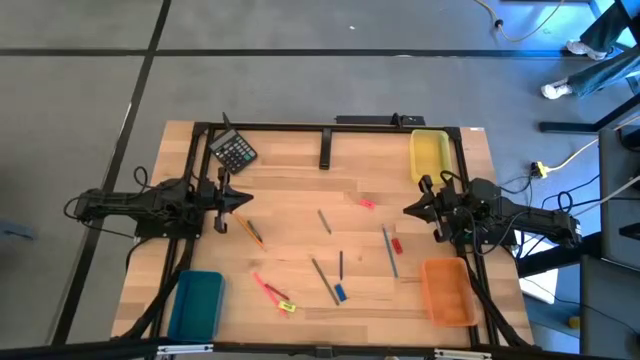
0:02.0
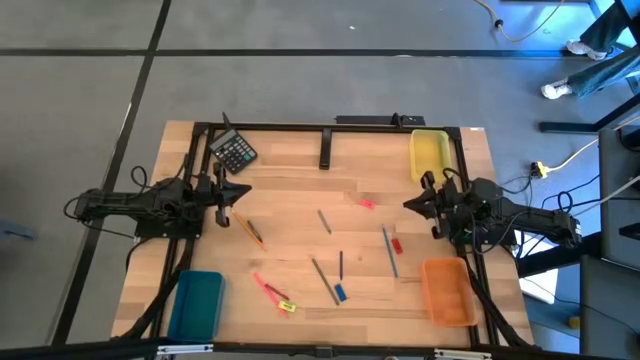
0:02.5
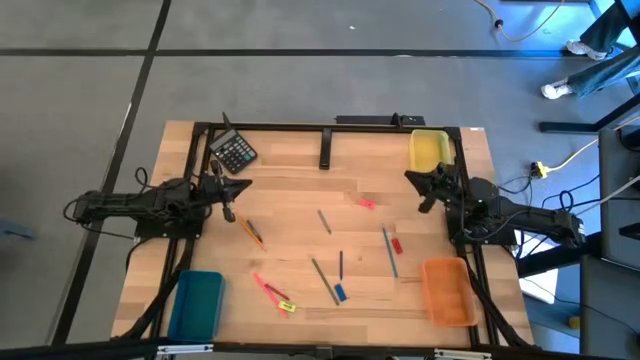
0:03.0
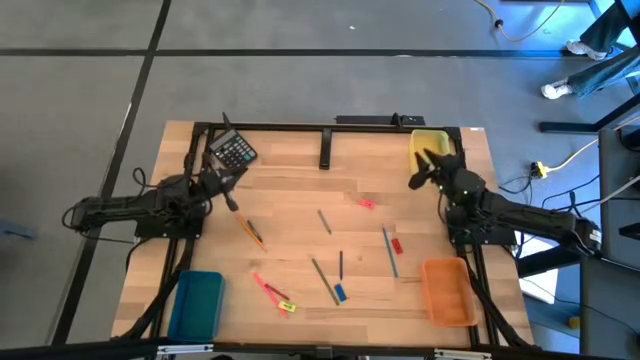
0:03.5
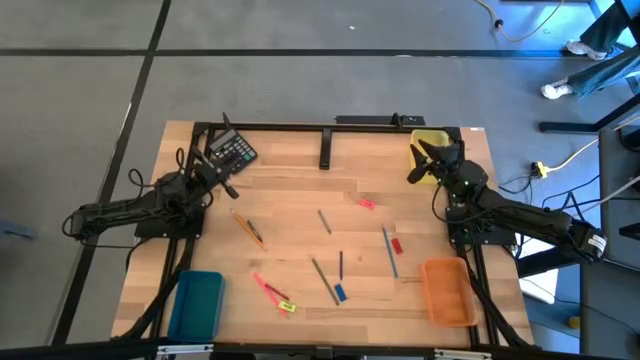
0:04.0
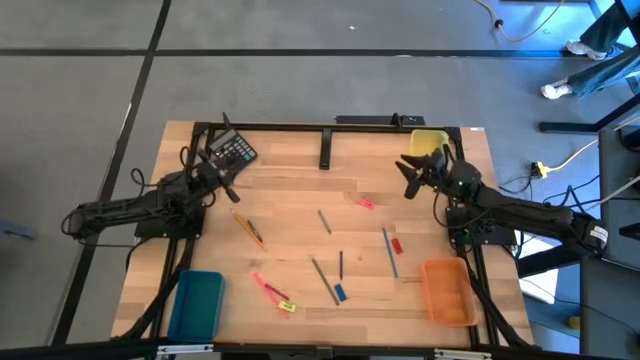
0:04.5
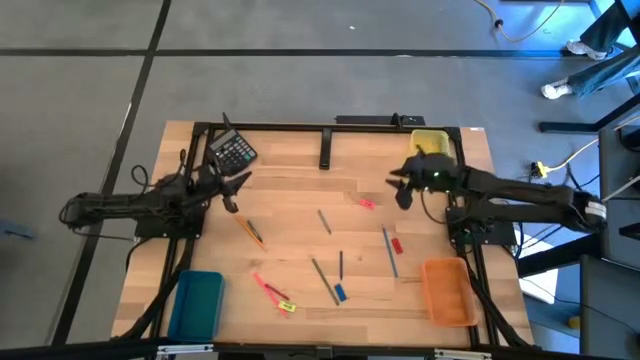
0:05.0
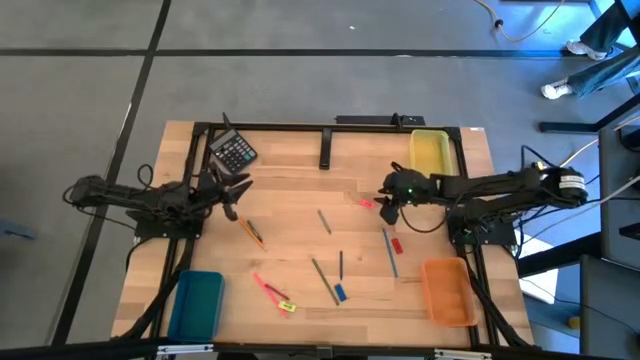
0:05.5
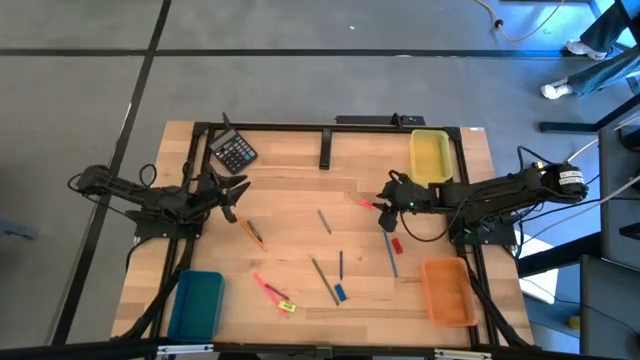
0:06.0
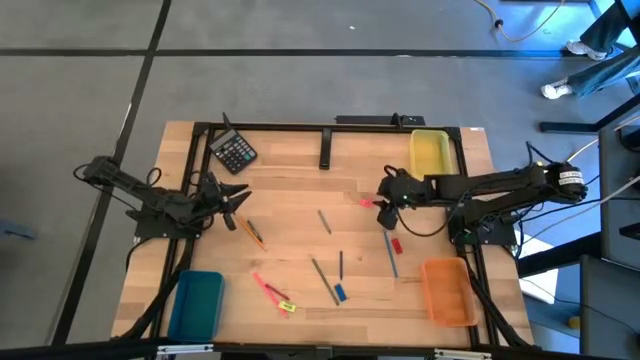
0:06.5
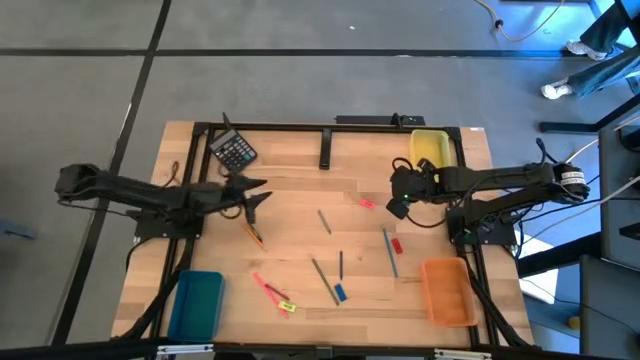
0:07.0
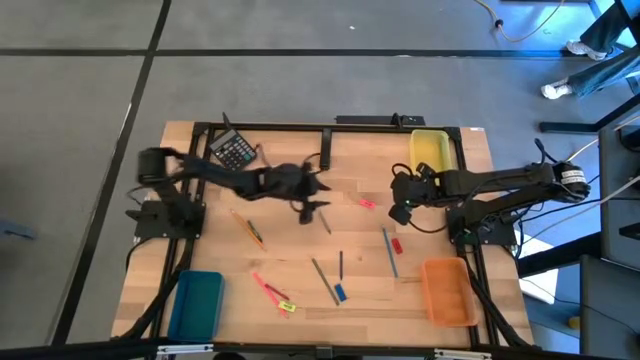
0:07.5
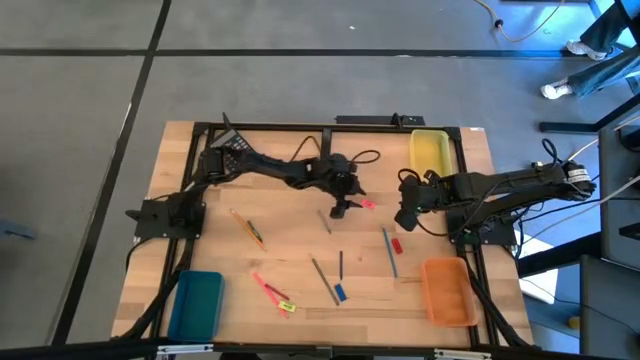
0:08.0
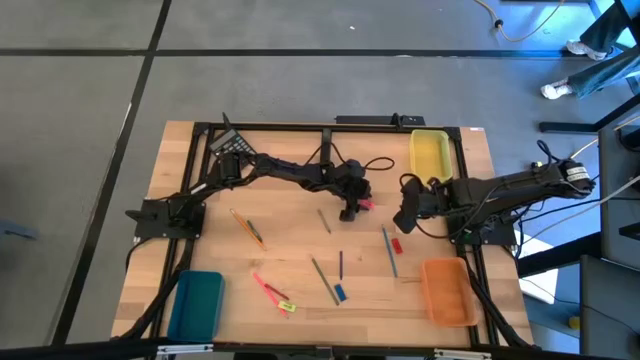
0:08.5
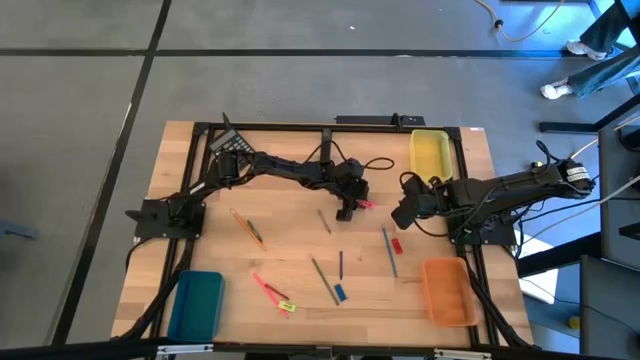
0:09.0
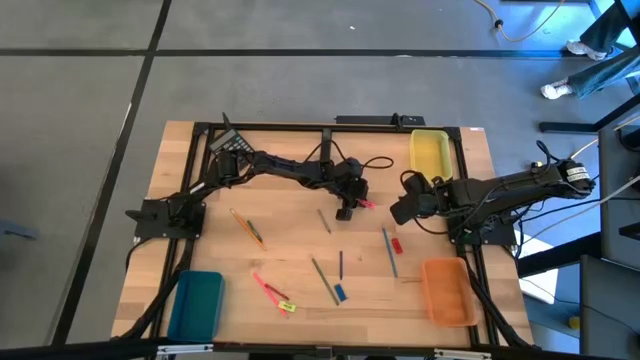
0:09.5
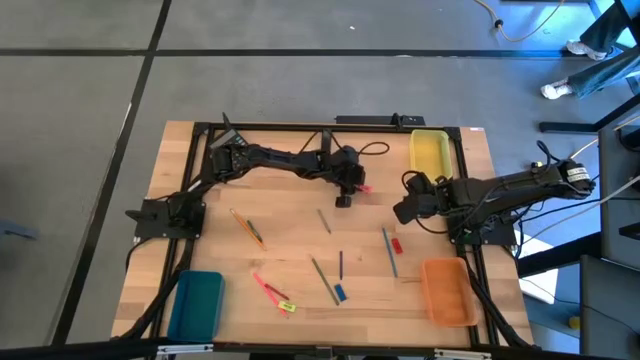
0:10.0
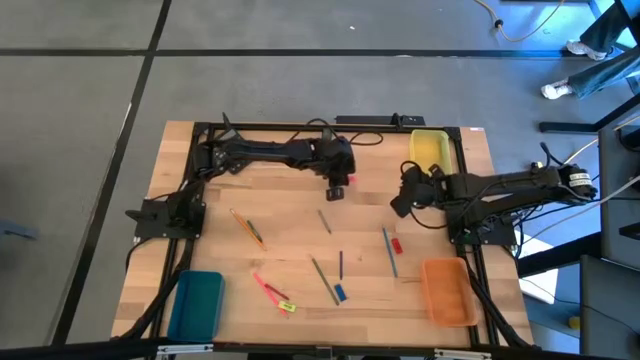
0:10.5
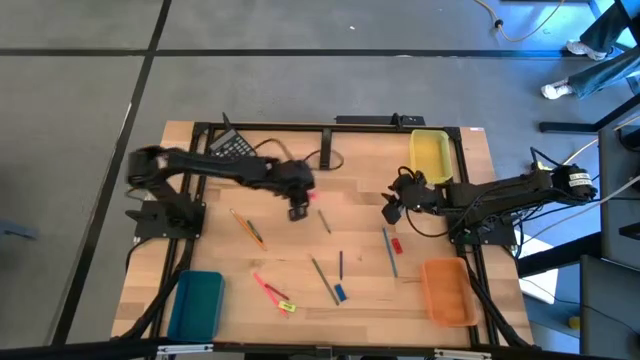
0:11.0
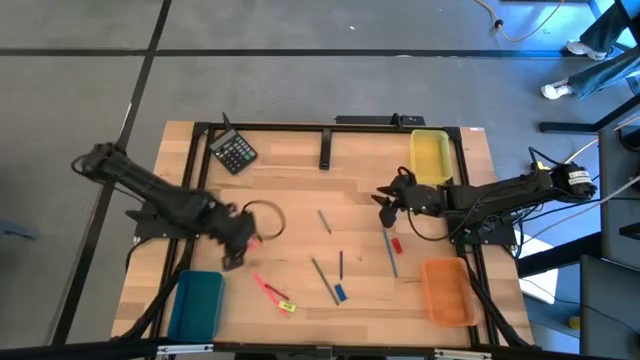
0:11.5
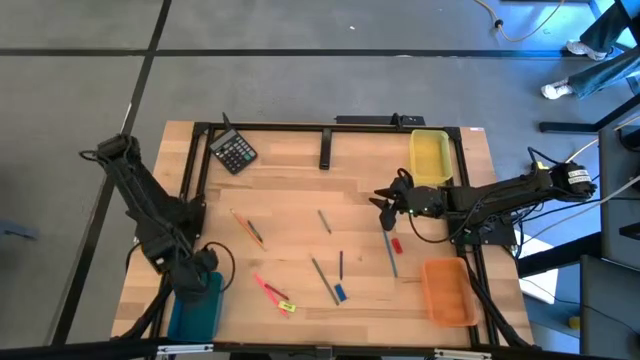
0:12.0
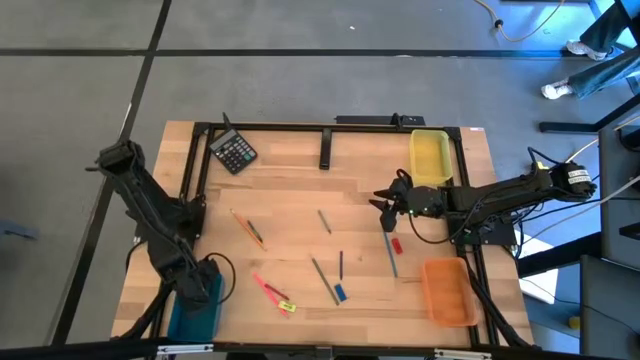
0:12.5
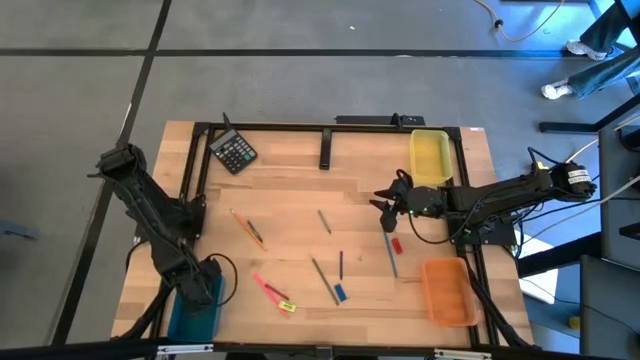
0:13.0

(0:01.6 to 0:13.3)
Task: Sort crayons/erasers/pens/pencils in bins
Put the pink eraser into the blue bin

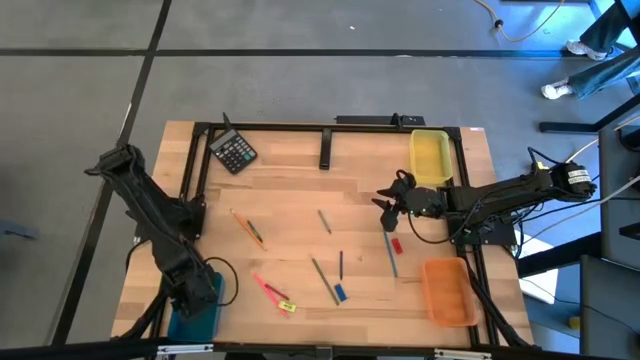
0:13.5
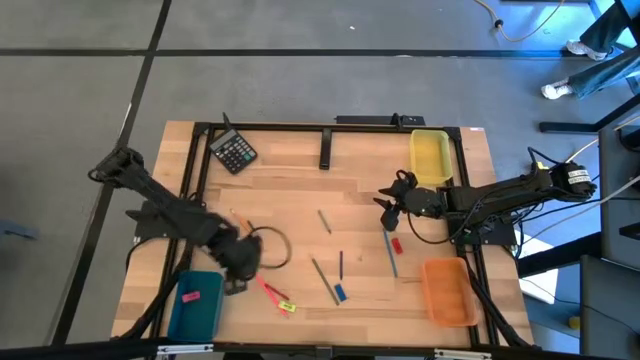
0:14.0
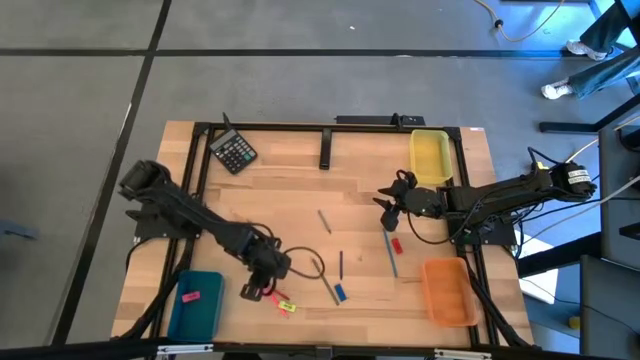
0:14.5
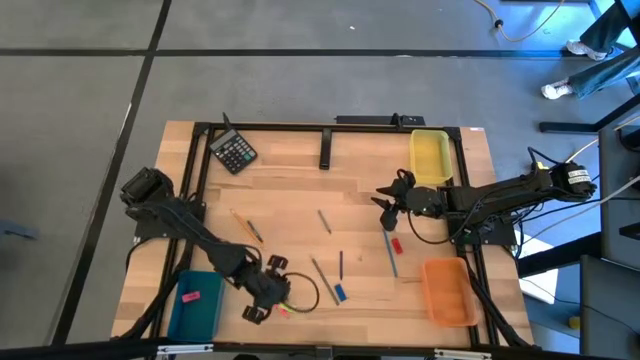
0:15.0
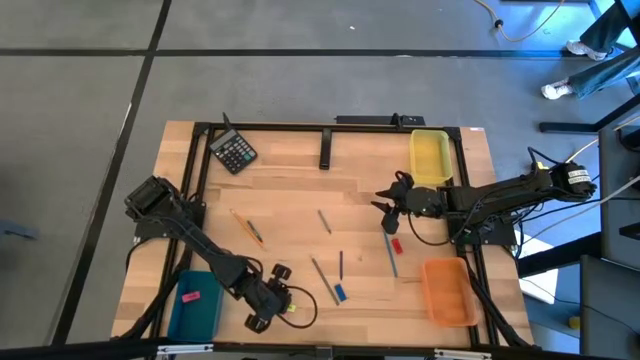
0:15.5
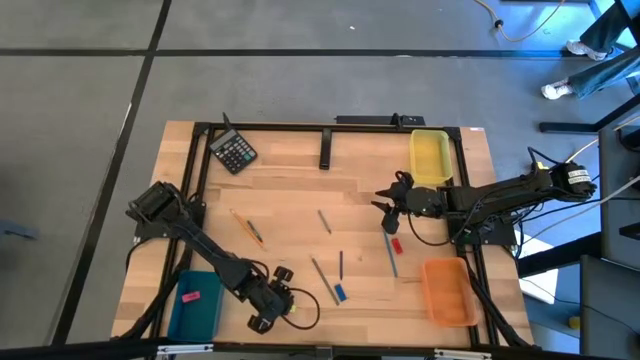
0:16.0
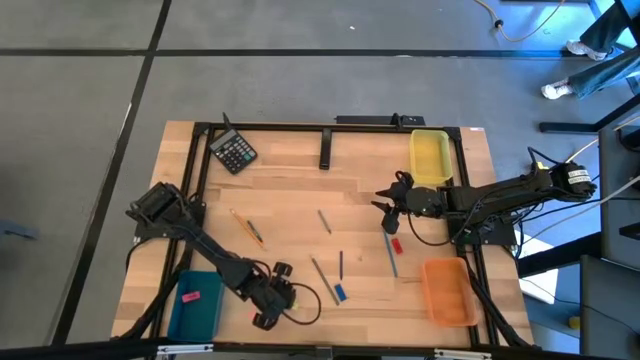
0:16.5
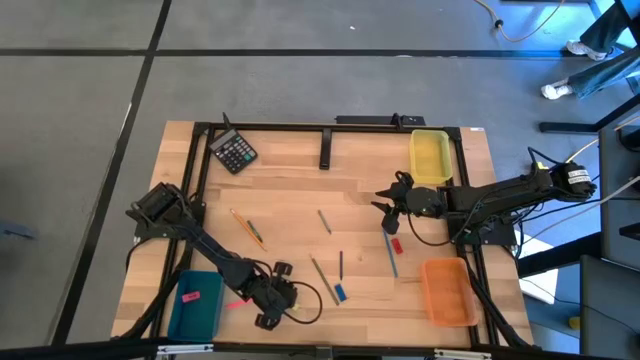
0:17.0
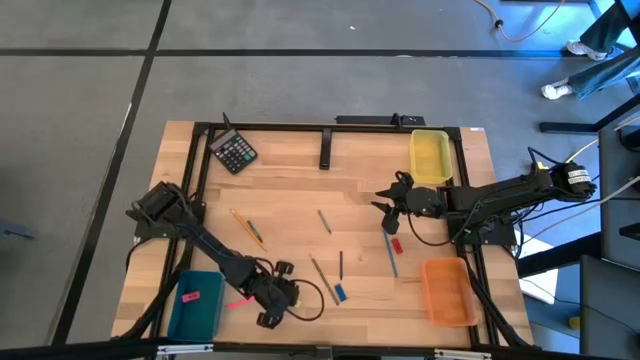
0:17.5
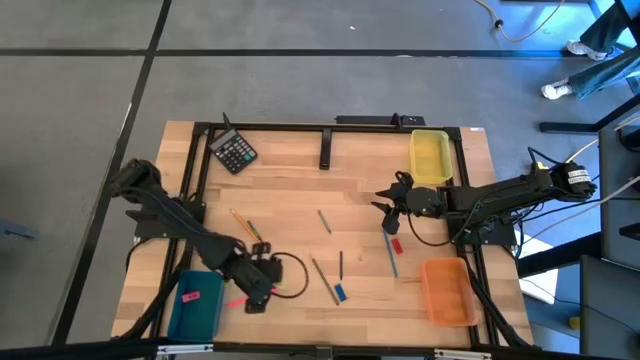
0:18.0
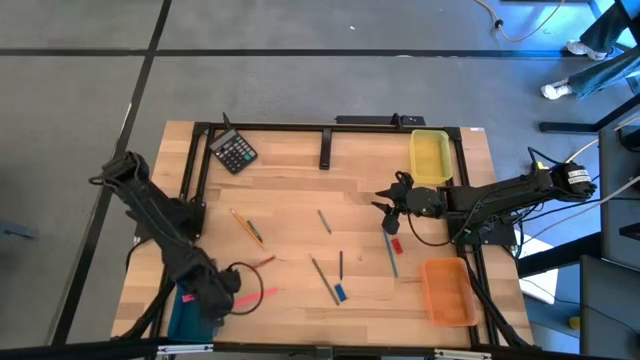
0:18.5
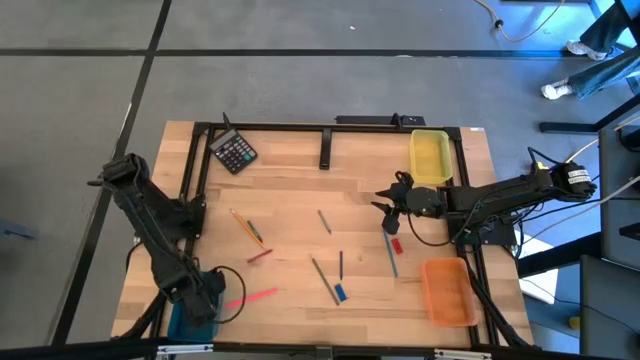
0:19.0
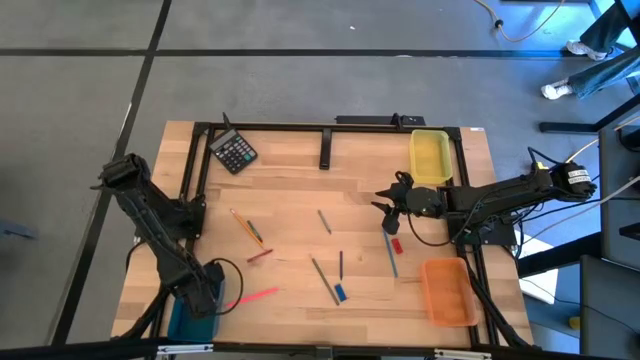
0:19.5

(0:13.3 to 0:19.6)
Put the yellow eraser into the blue bin

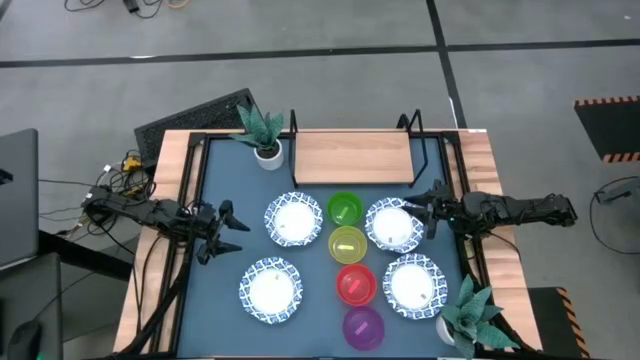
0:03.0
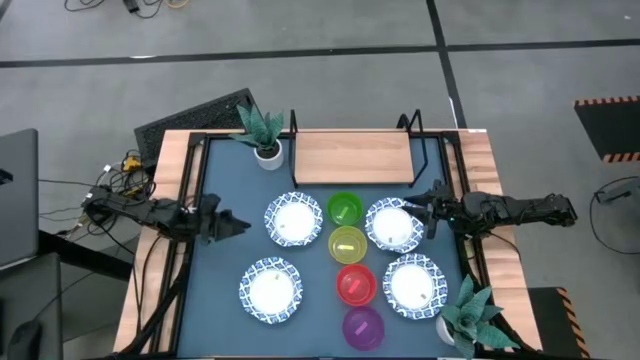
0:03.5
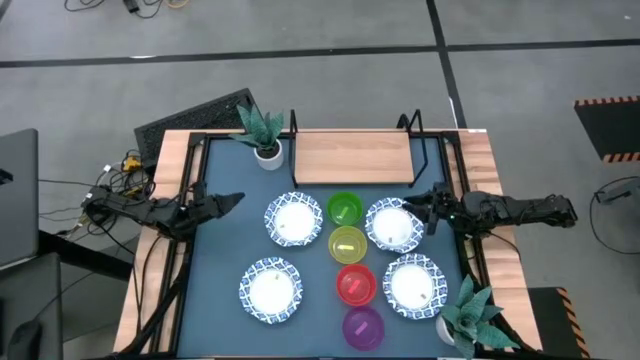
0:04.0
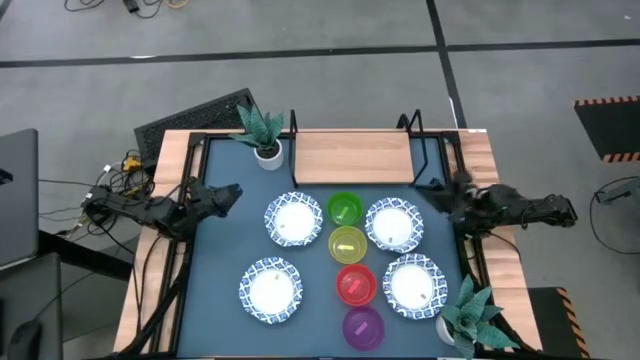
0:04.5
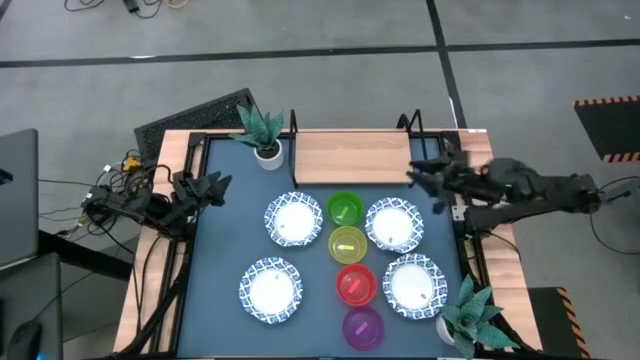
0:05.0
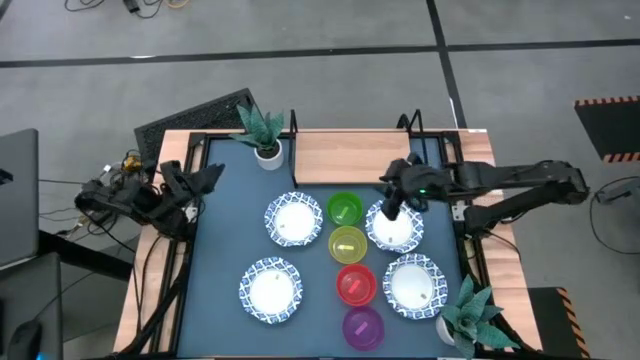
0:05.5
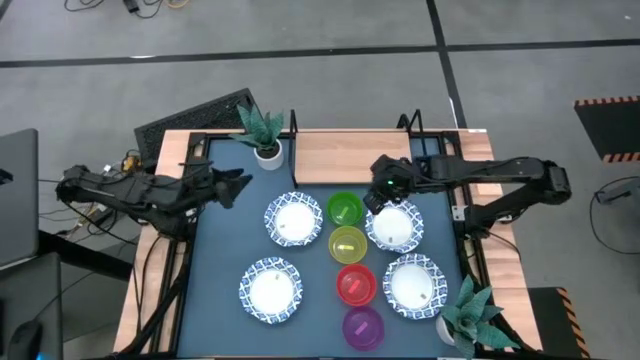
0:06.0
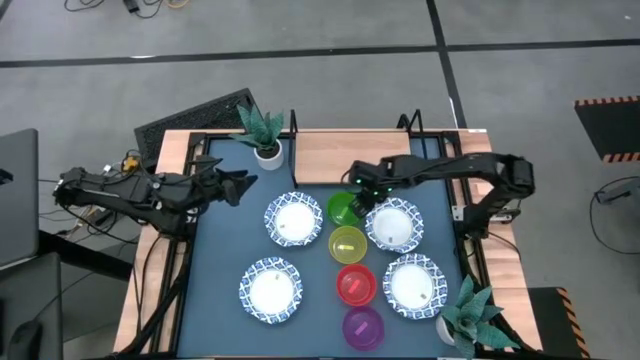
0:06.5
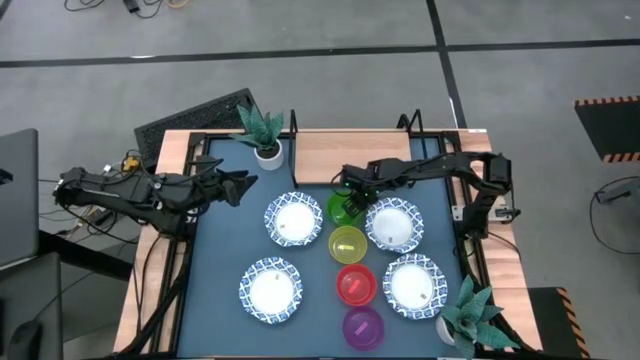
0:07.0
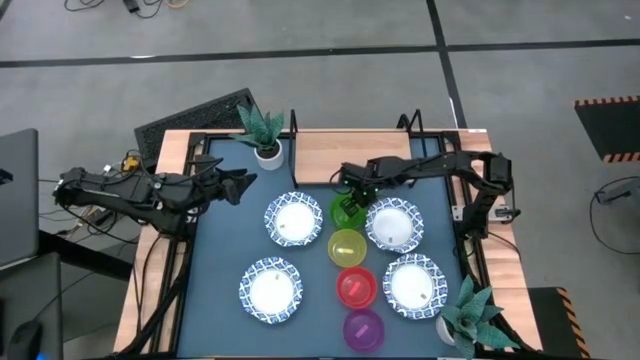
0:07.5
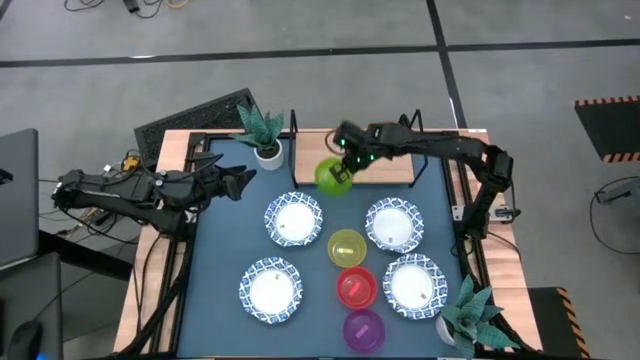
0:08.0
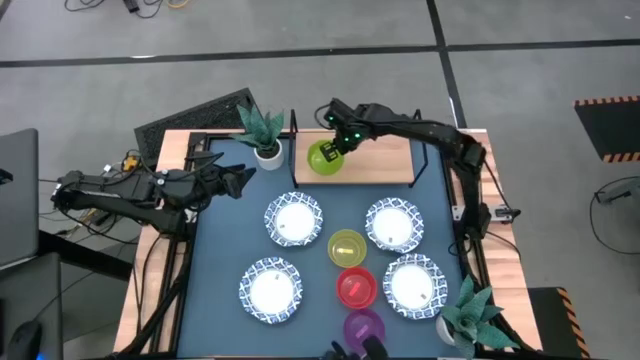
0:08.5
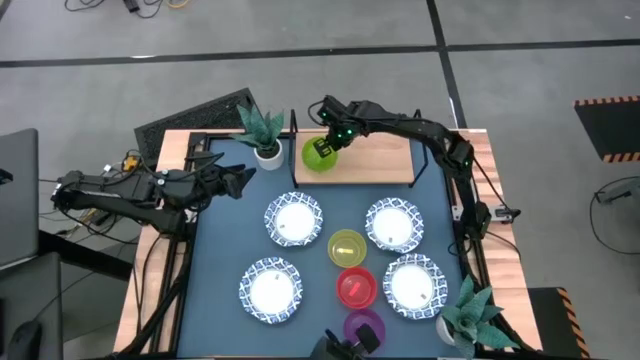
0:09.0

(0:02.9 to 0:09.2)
Task: Place and stack bowls onto a shelf
Put the green transparent bowl on the shelf
